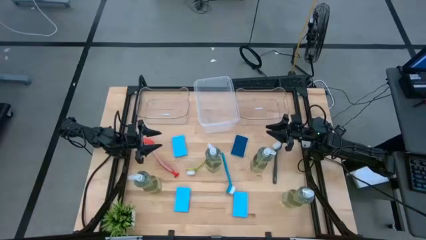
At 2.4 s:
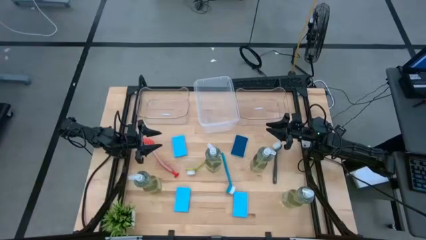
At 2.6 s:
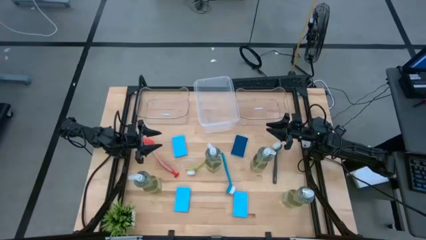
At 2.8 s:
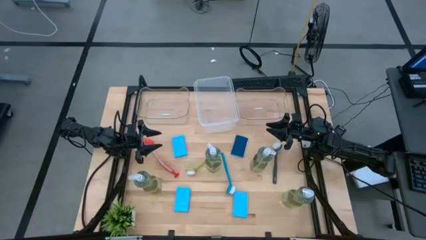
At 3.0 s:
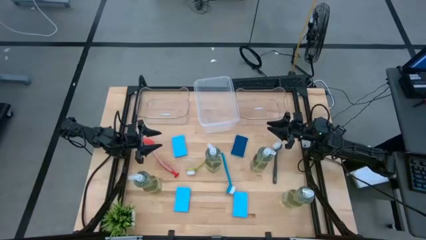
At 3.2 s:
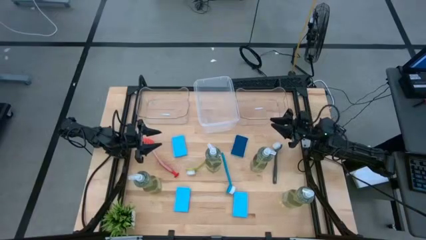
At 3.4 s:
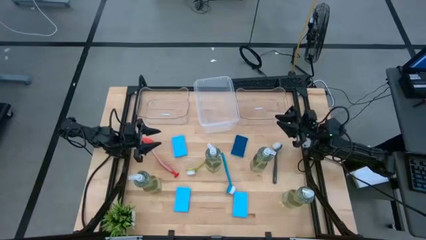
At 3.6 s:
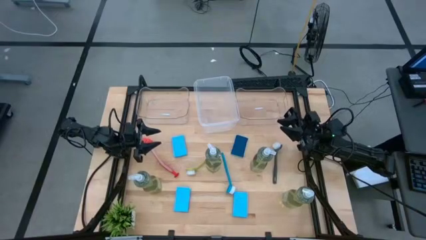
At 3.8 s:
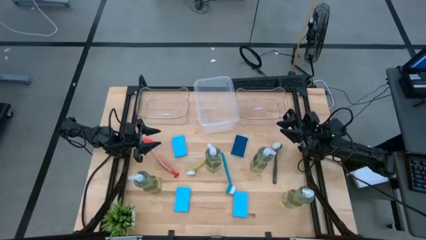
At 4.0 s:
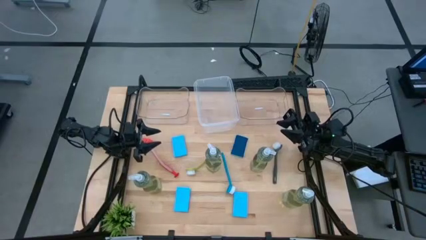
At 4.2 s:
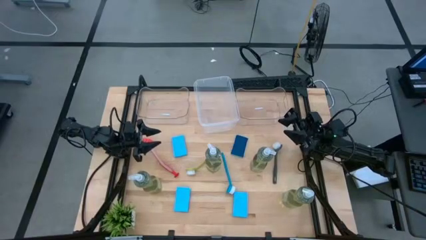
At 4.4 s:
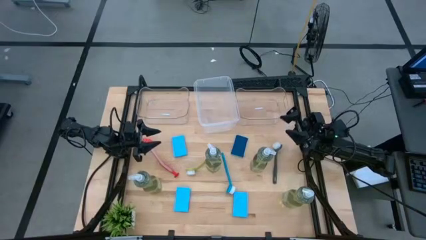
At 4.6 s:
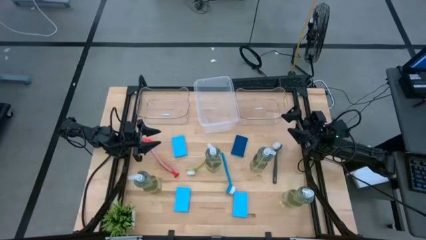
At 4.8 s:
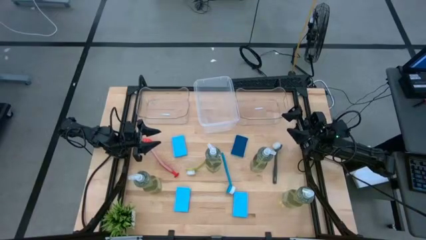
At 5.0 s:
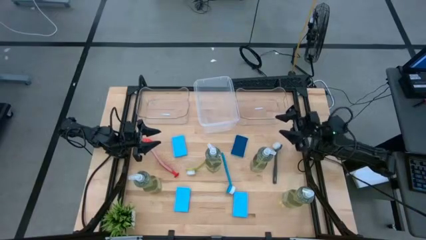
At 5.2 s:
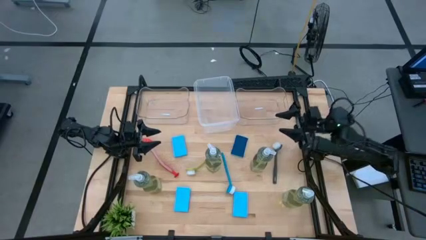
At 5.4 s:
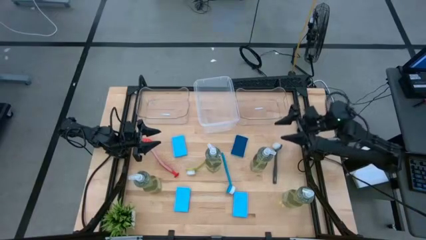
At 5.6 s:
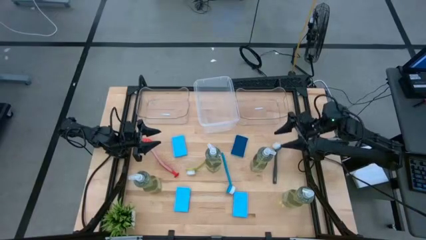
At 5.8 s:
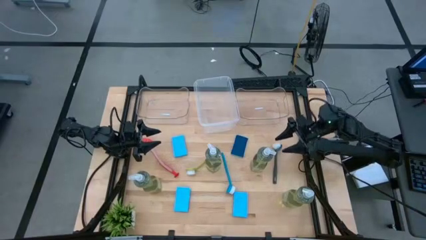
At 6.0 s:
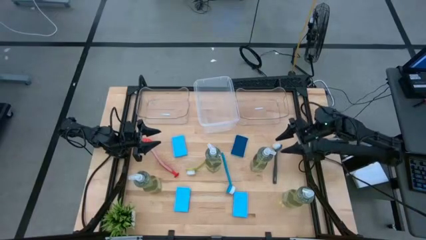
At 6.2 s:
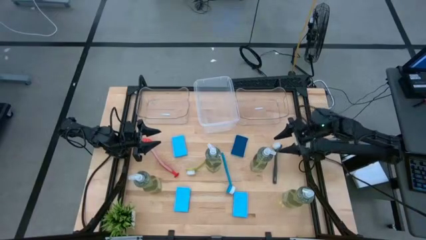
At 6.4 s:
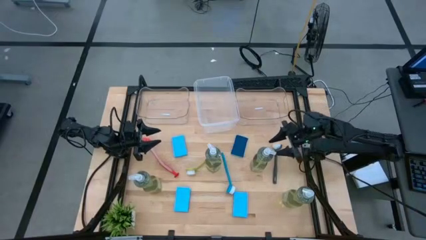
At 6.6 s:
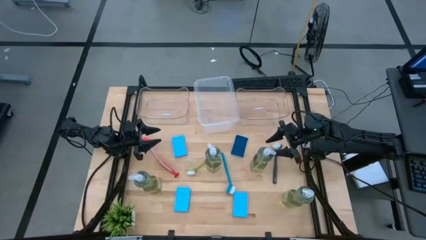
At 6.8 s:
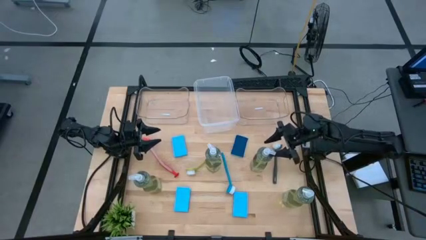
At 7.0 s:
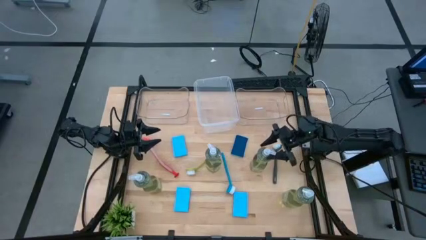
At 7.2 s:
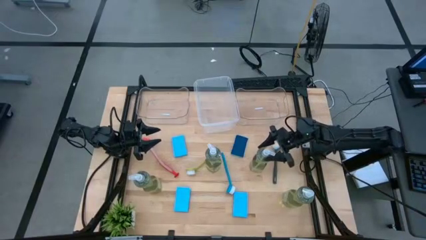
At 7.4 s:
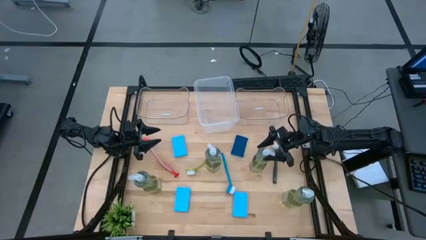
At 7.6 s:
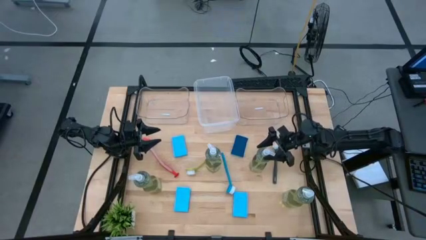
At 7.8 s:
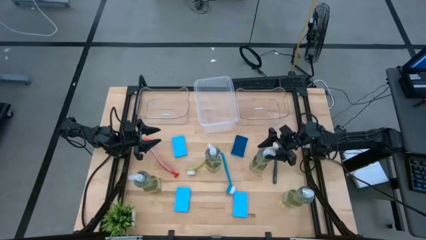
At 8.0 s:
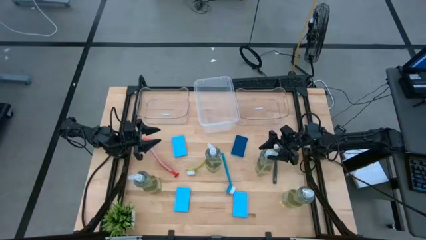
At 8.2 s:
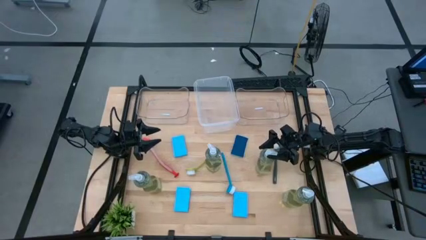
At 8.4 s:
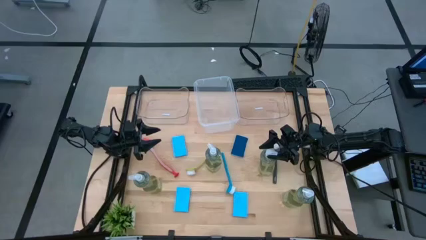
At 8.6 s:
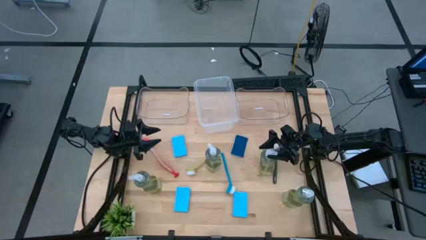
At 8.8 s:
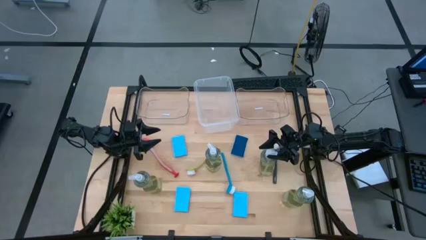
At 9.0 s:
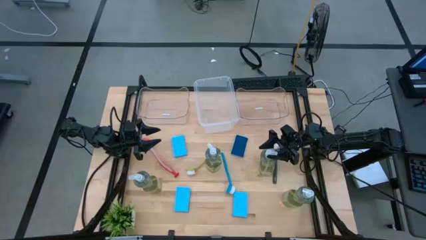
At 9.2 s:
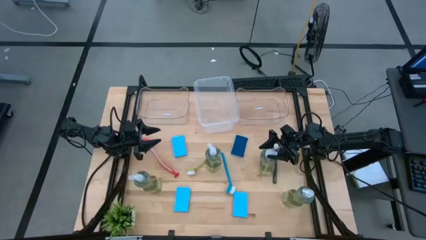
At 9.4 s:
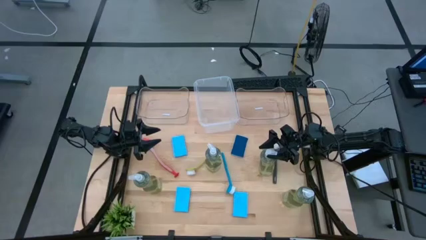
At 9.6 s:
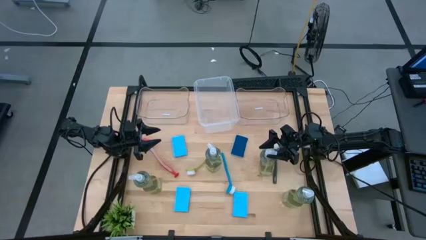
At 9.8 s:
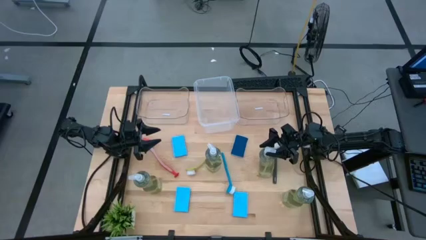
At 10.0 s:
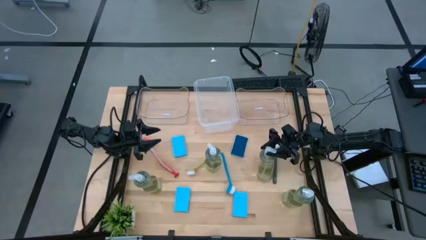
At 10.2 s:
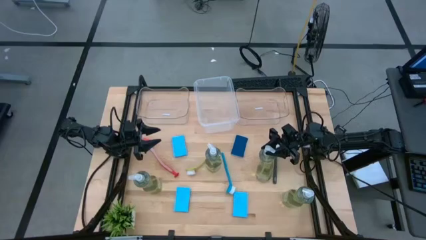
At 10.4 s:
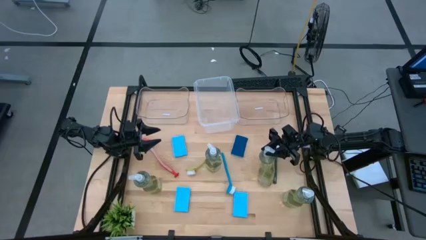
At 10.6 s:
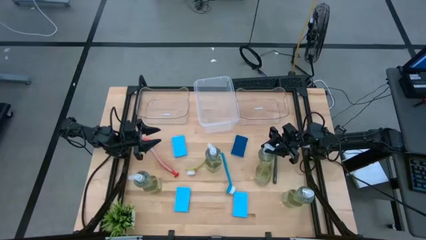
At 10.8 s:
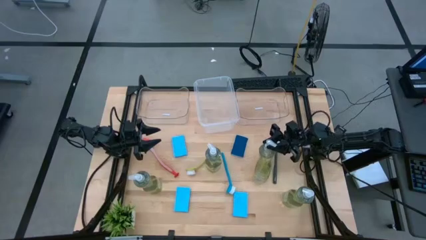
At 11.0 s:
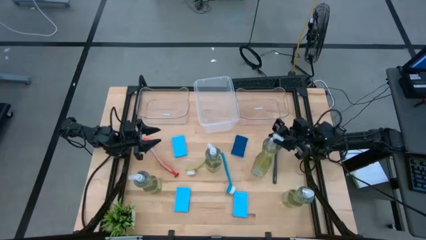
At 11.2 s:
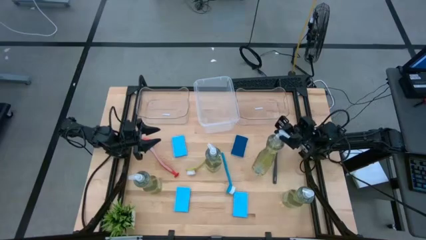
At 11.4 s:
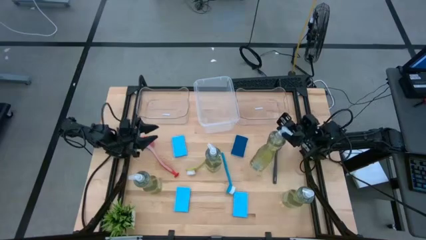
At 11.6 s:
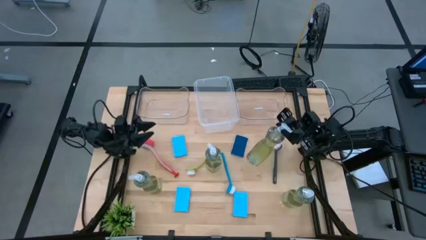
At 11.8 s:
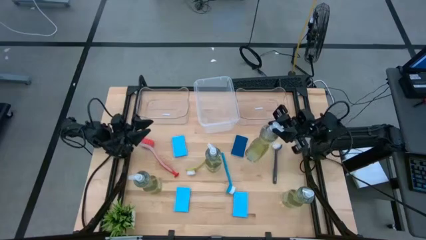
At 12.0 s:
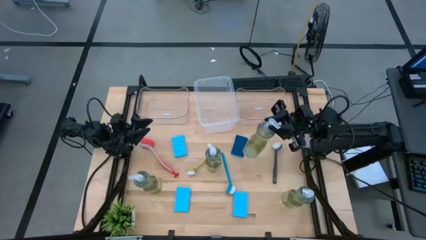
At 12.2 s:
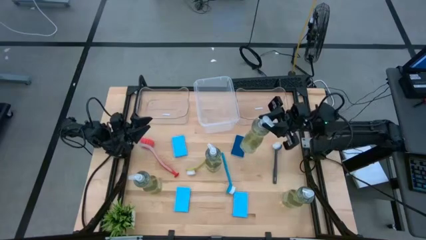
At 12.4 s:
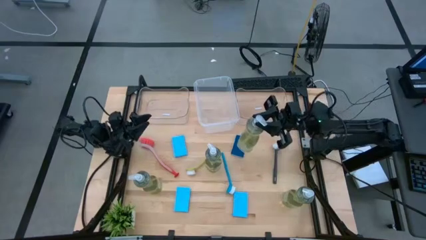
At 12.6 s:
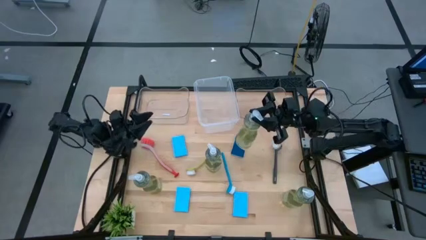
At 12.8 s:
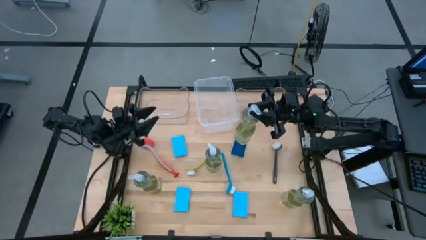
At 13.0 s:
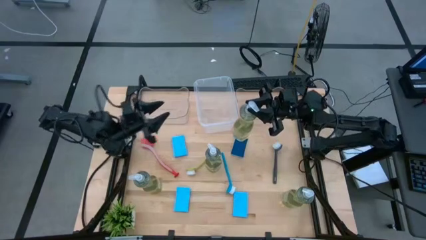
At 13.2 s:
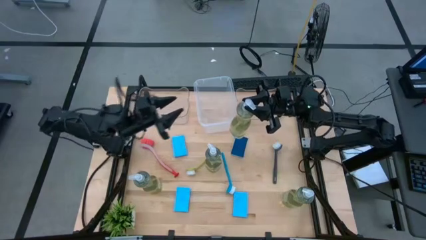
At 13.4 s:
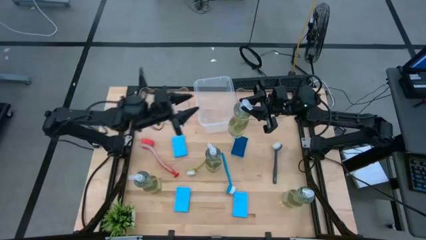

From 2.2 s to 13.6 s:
Task: Pick & Place Kitchen Sink Supplies
Put the green soap dispenser into the transparent white bin

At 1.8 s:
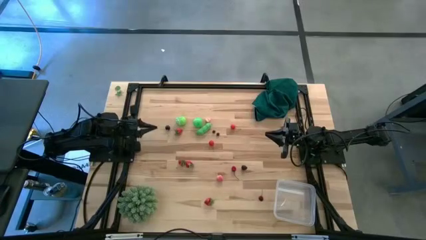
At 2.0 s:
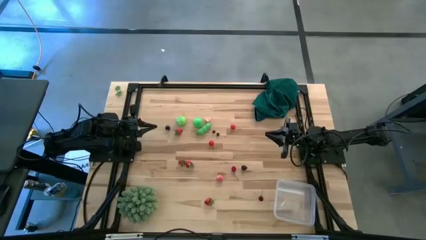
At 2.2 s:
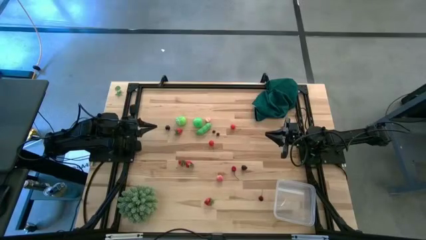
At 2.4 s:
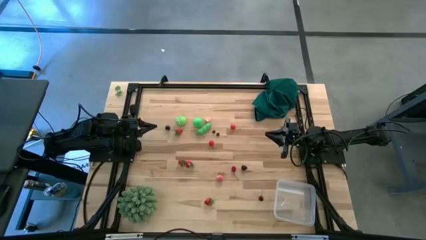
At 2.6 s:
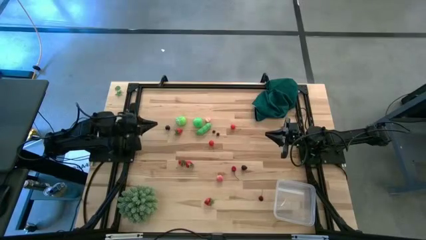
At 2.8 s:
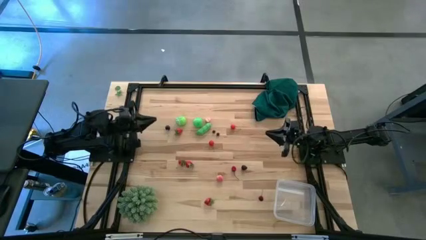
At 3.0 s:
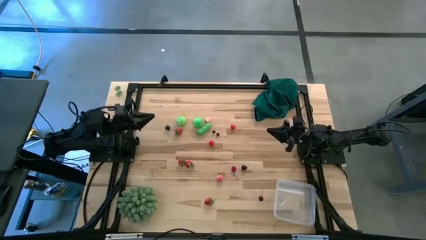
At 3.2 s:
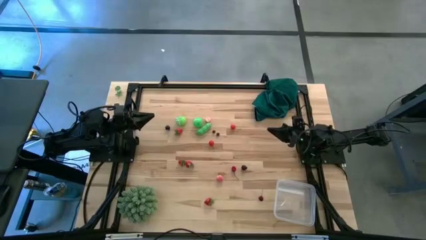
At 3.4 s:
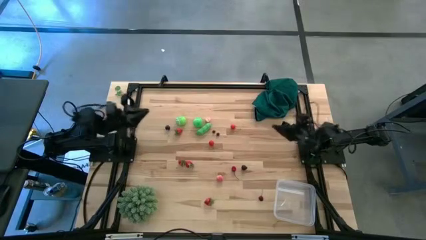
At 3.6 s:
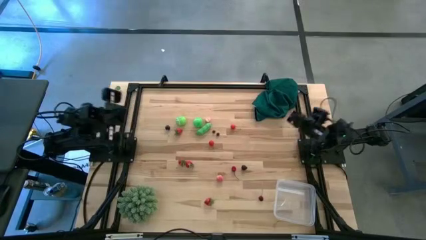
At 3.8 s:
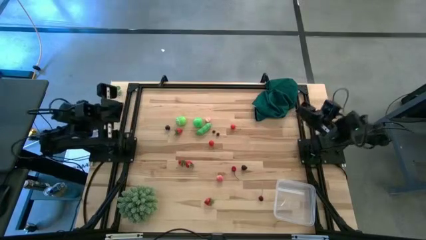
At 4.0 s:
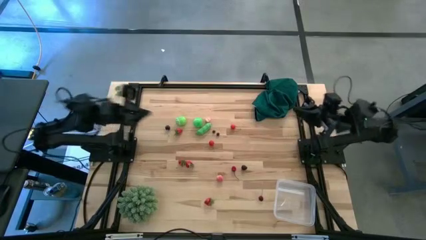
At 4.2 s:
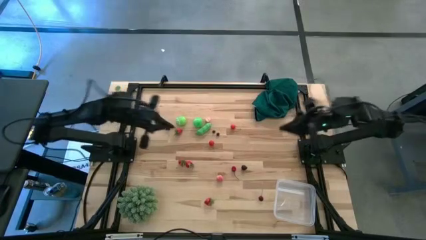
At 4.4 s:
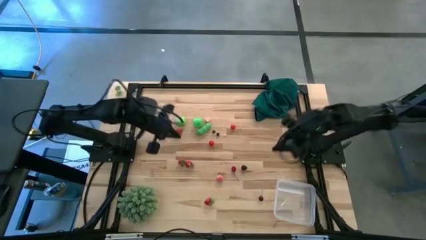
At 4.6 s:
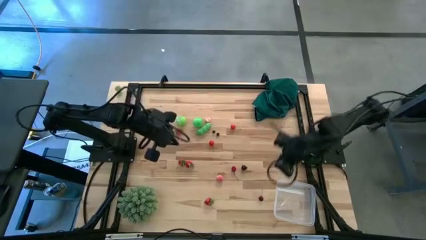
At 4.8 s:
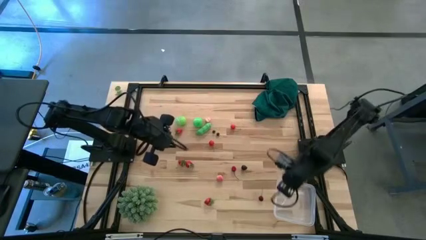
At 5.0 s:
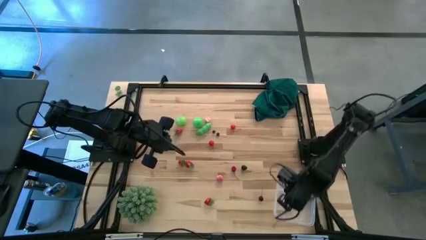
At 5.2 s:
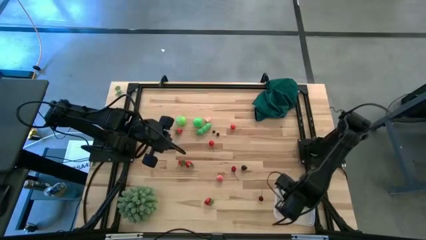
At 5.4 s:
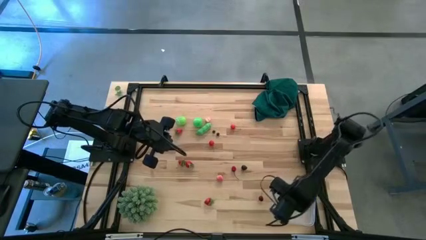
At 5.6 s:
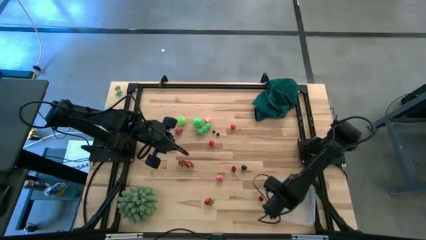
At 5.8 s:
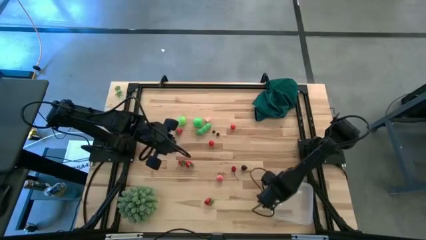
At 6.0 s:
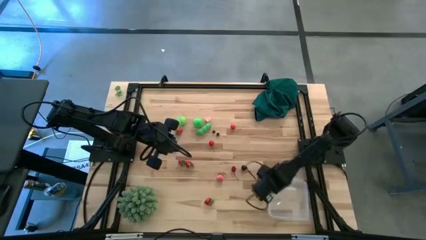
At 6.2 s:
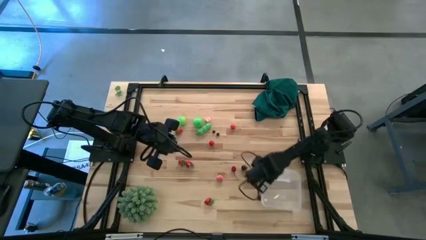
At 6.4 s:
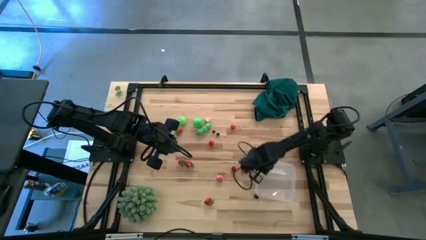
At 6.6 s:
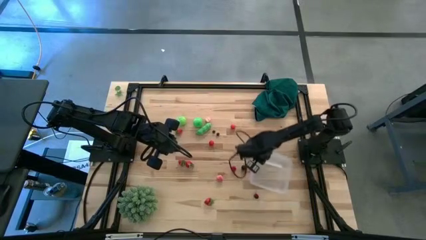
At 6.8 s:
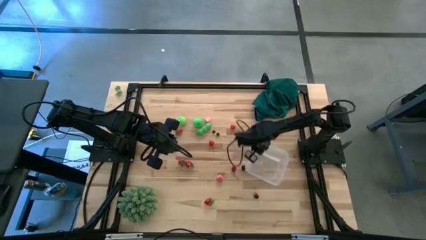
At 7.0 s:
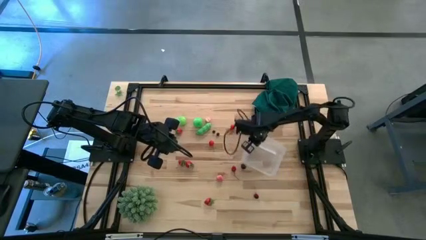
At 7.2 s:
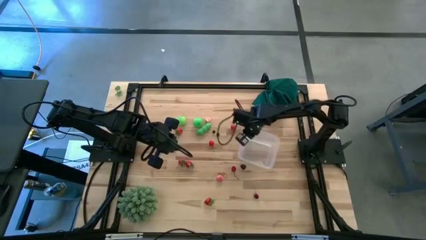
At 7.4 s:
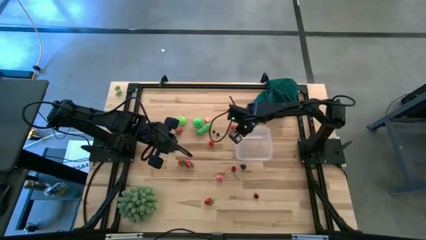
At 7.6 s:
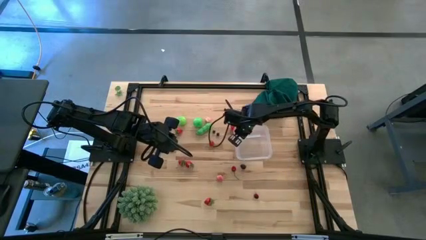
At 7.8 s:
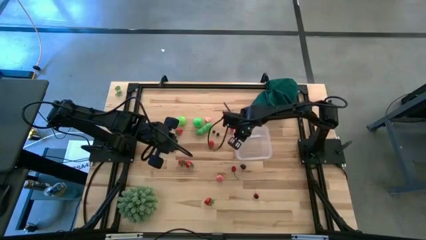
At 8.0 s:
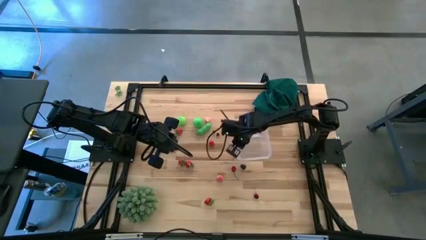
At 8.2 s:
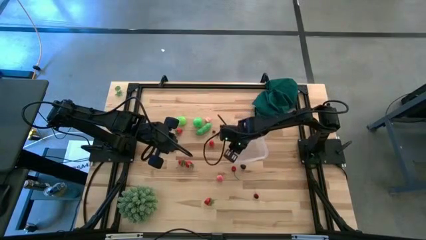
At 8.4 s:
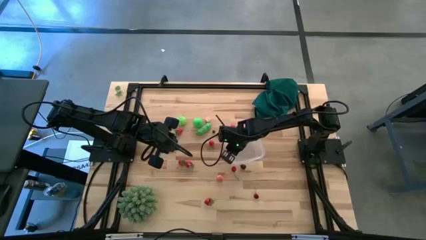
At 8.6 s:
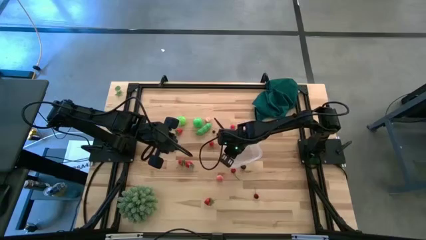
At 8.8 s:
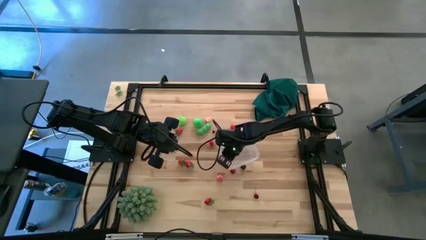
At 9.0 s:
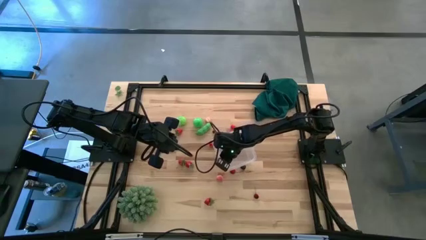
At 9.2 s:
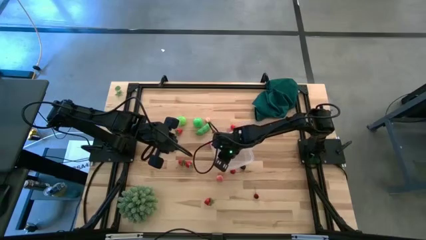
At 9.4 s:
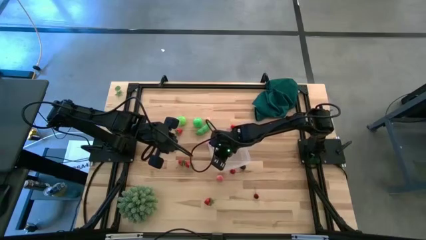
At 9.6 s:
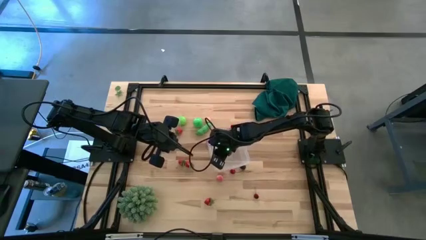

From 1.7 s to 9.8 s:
Task: Pick and placing Produce into tupperware
Adjust the transparent container
